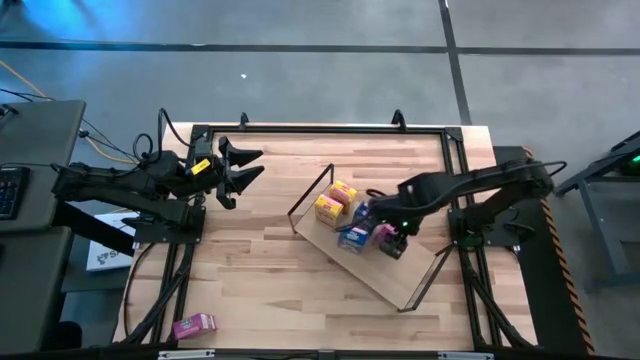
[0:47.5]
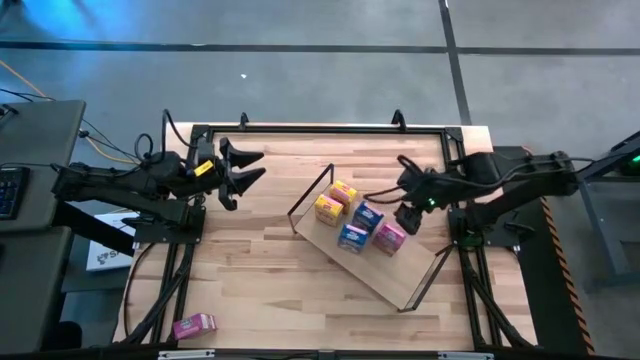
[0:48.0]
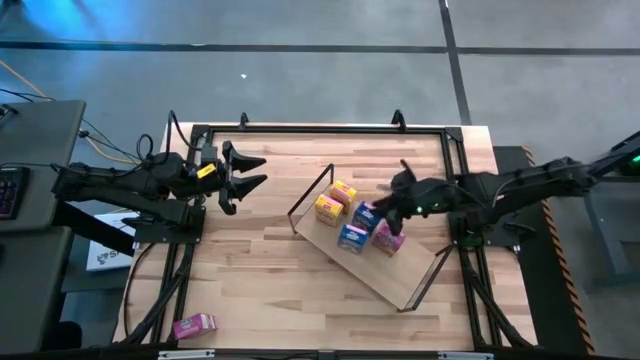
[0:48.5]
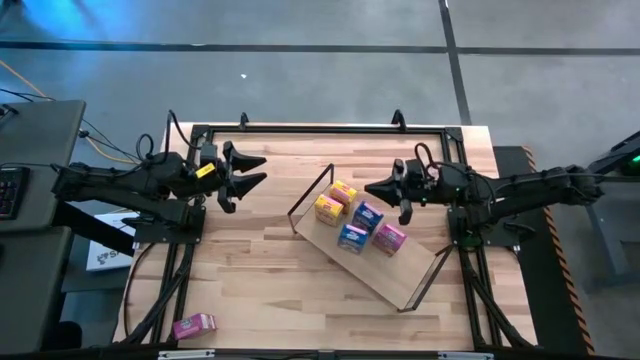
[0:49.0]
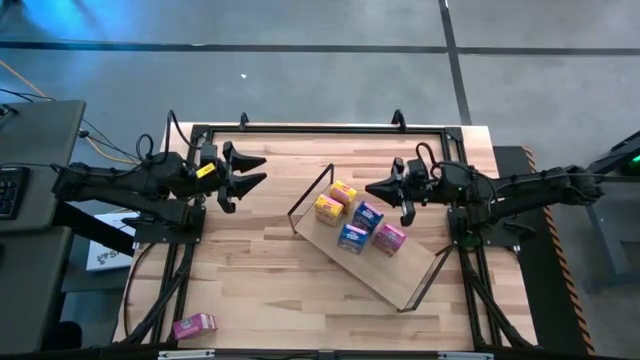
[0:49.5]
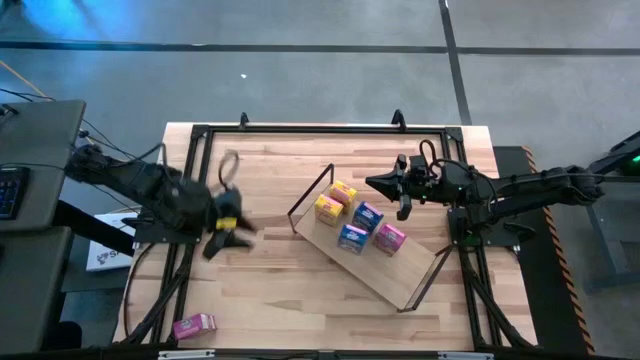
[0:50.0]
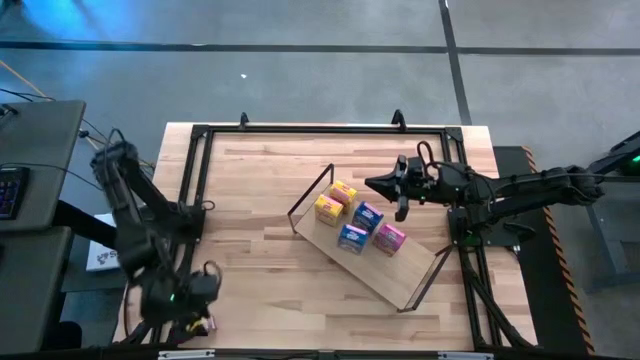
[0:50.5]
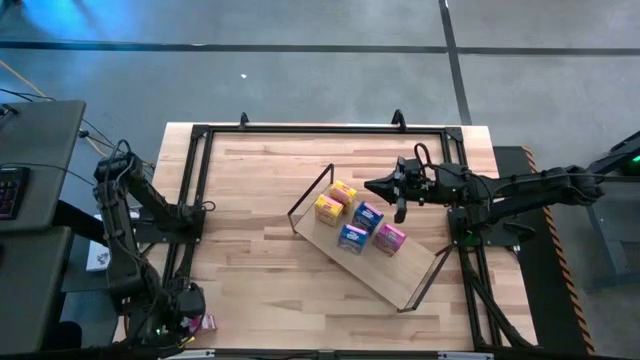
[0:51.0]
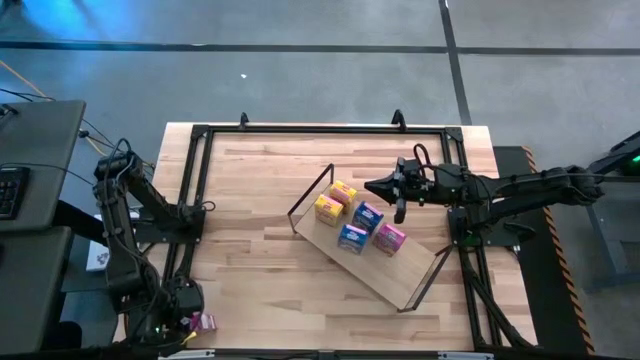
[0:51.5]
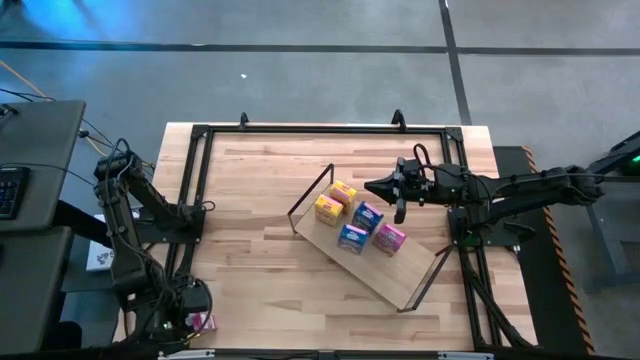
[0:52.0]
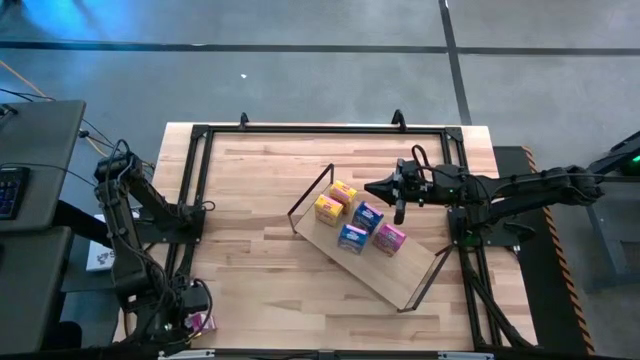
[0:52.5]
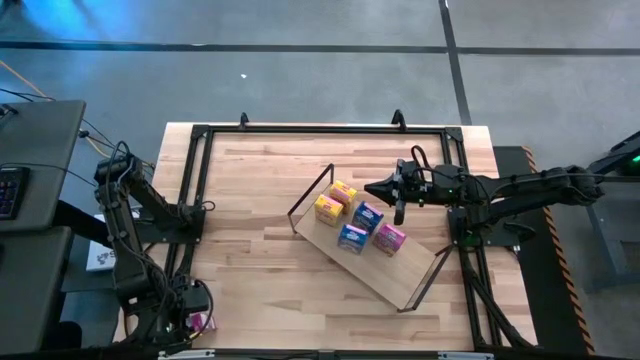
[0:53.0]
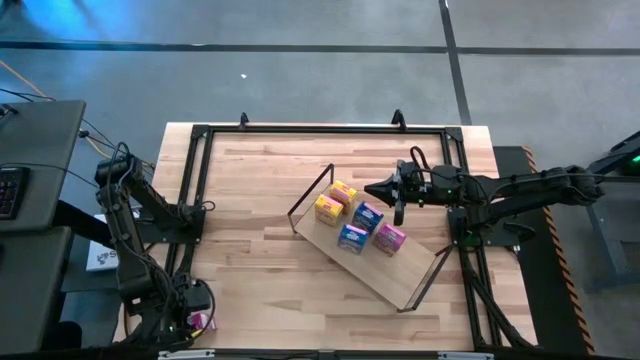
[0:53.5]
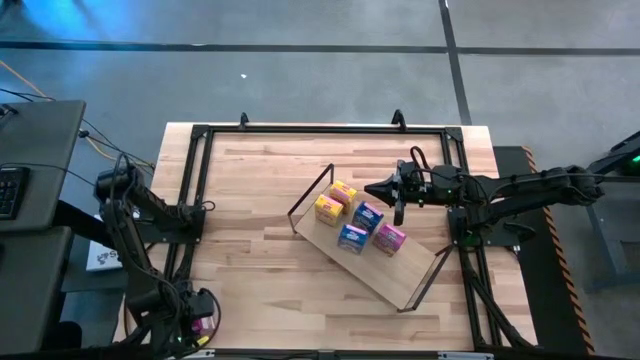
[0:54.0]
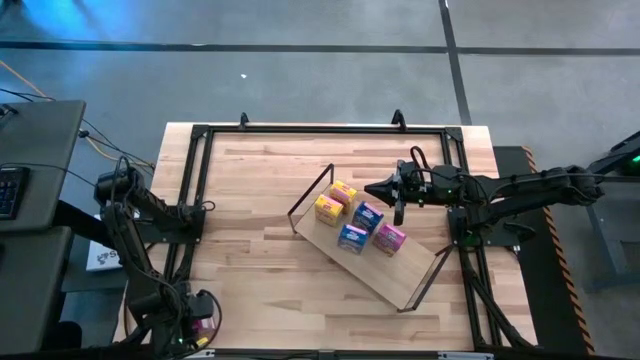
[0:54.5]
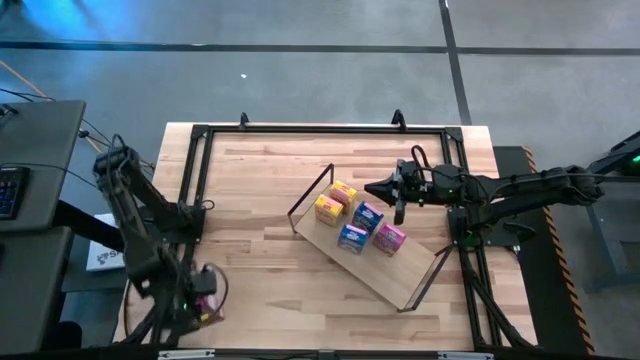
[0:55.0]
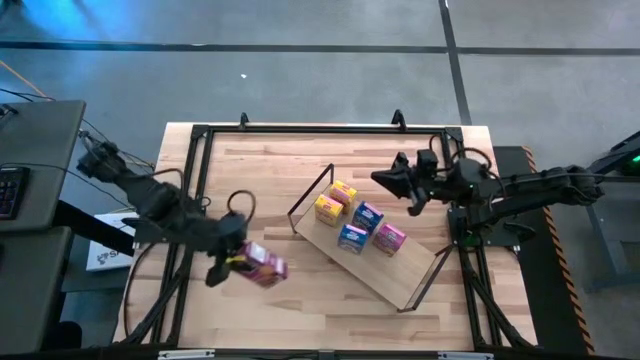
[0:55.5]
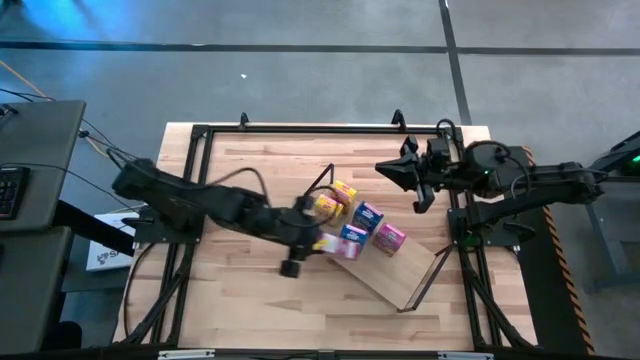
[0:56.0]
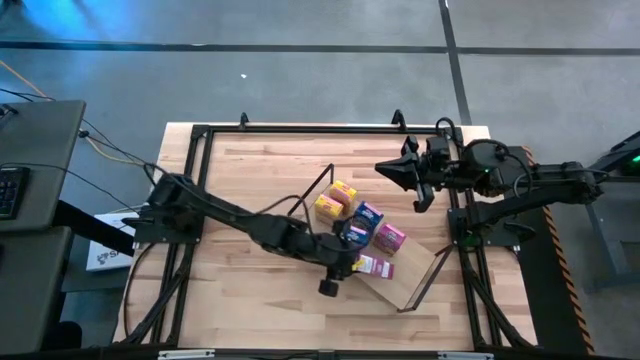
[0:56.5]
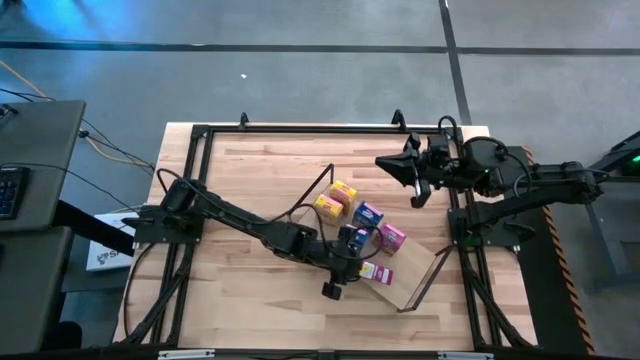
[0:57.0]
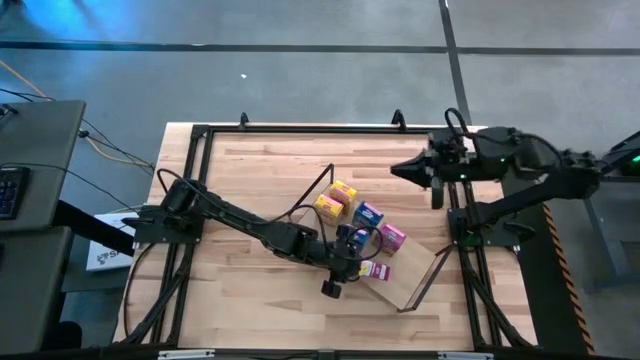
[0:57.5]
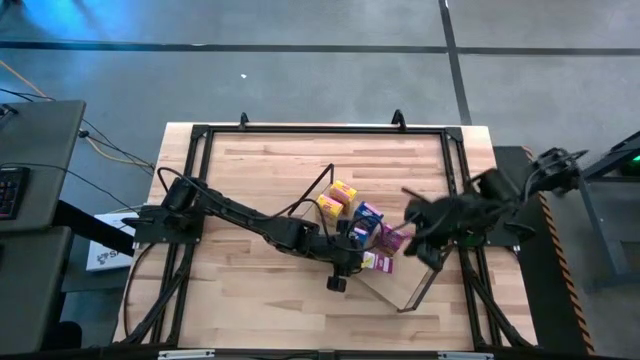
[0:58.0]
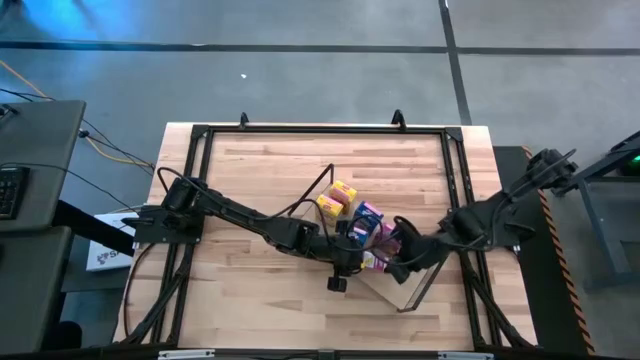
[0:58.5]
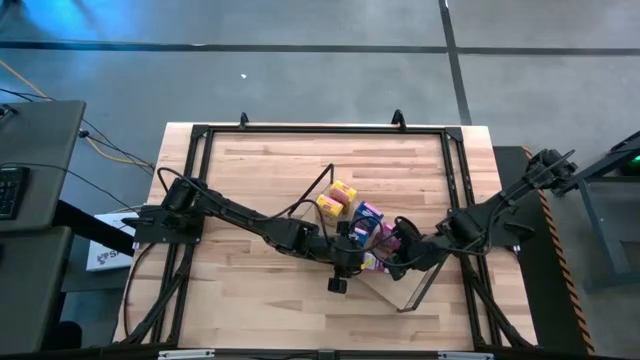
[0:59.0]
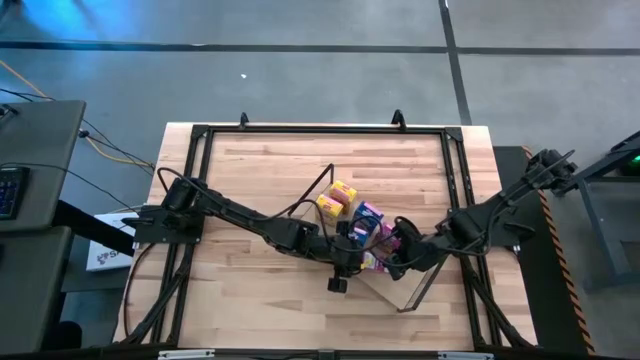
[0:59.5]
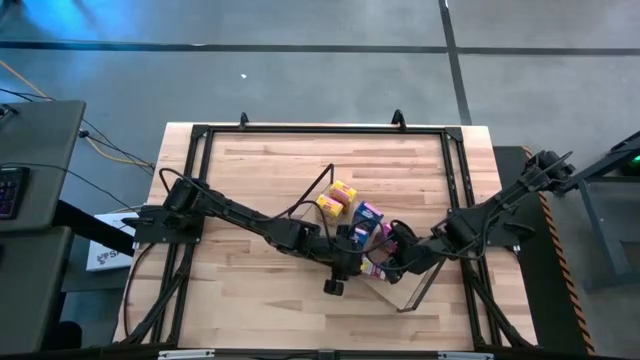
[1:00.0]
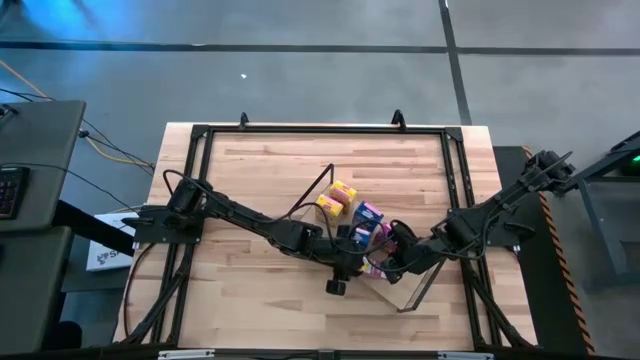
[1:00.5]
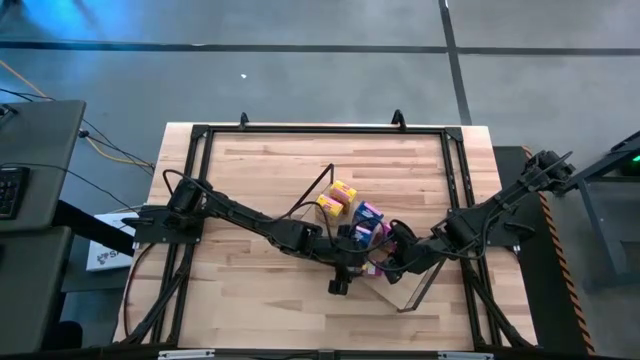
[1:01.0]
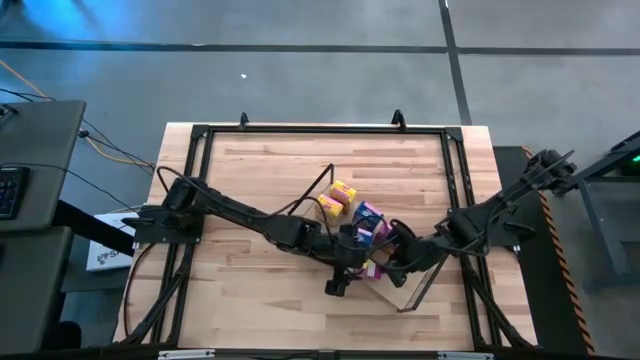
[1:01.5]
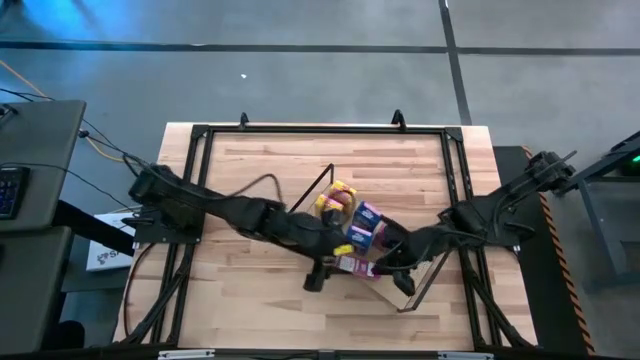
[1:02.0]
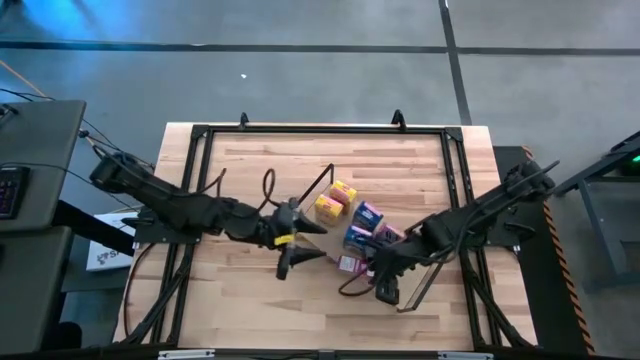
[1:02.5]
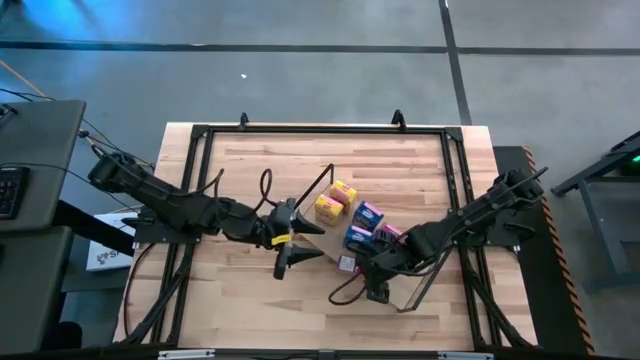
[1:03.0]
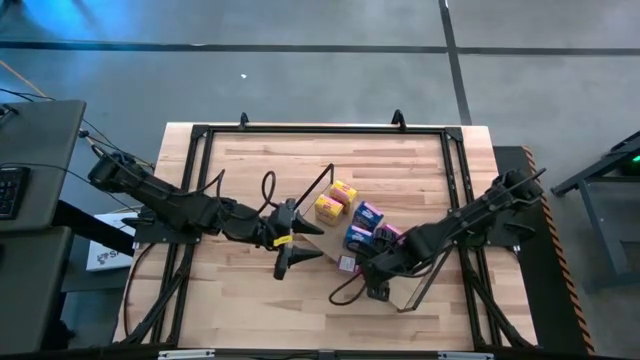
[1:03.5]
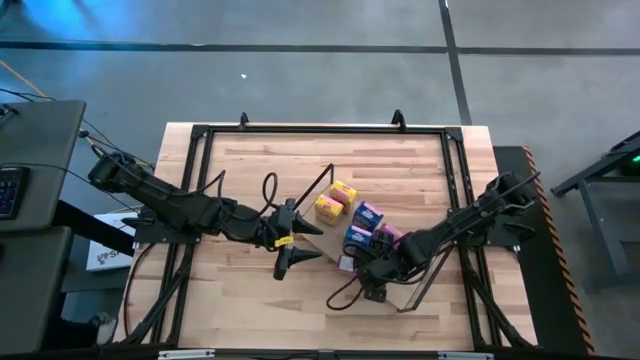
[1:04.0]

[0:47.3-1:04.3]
Task: Stack cereal on shelf
Put the bottom left purple cereal box on the shelf

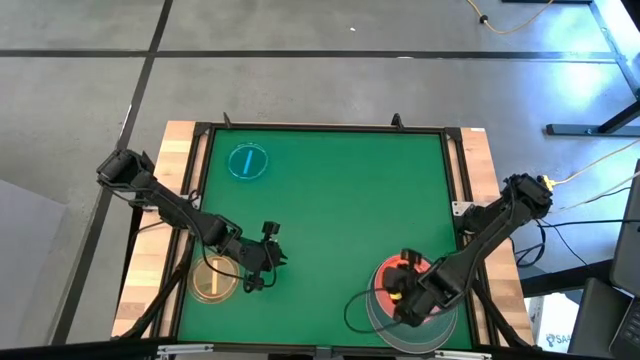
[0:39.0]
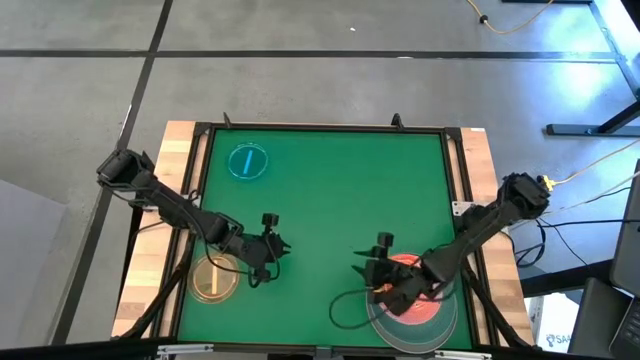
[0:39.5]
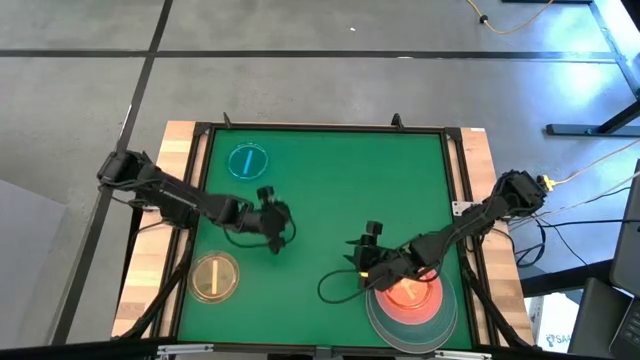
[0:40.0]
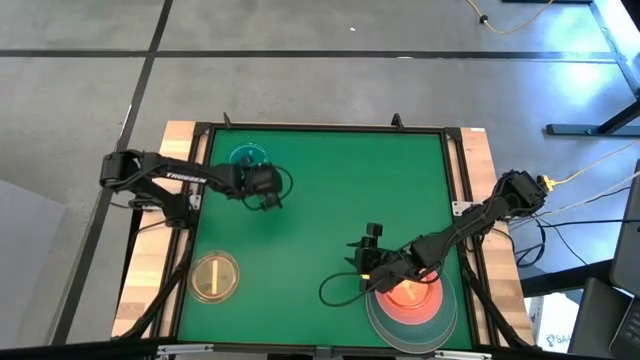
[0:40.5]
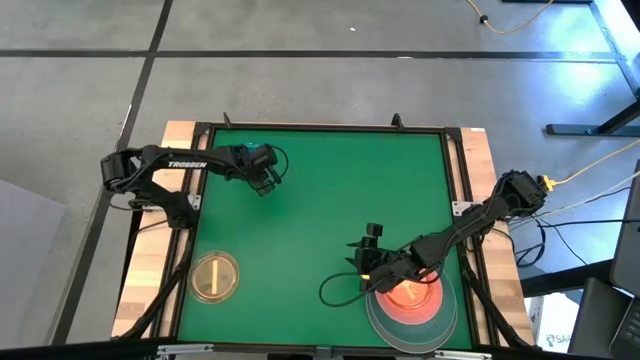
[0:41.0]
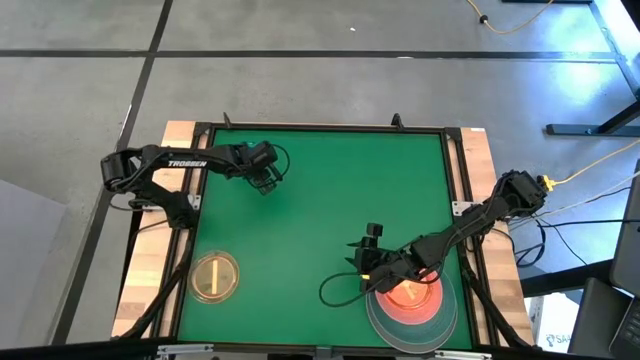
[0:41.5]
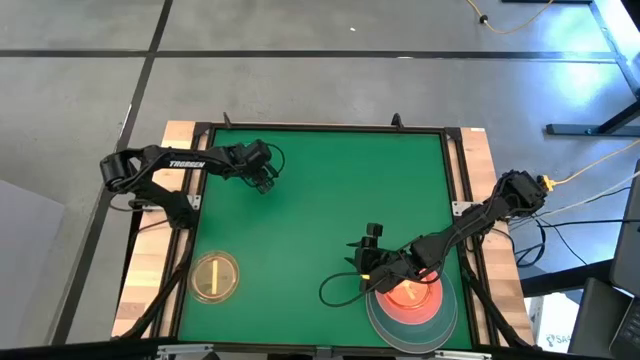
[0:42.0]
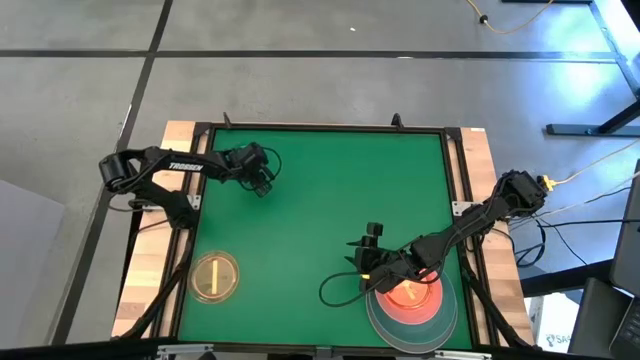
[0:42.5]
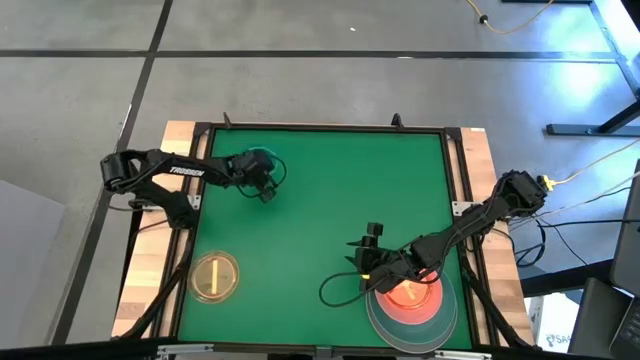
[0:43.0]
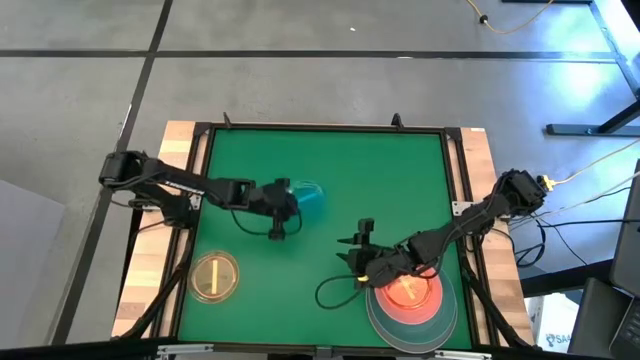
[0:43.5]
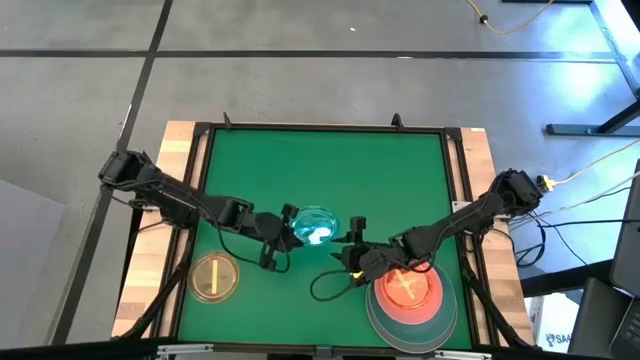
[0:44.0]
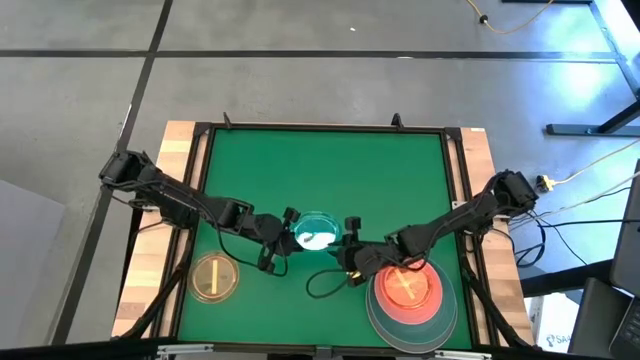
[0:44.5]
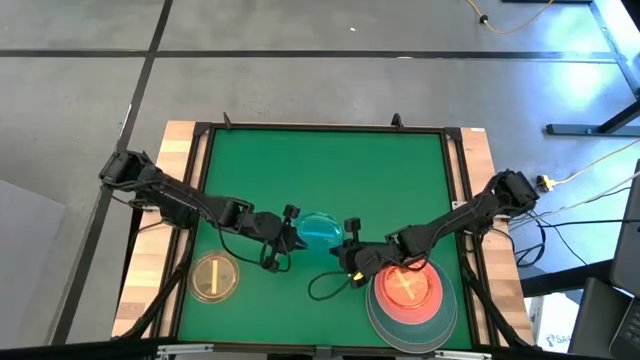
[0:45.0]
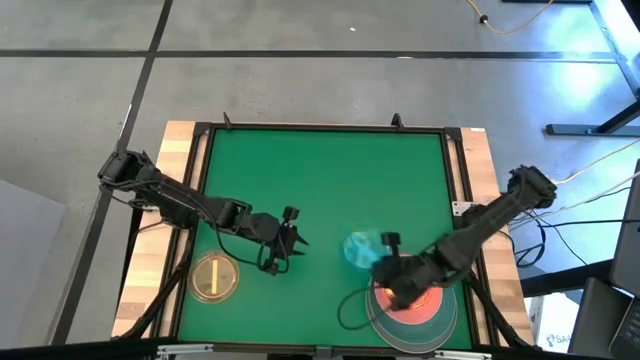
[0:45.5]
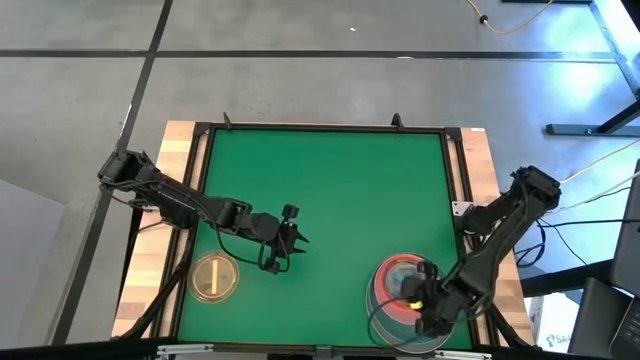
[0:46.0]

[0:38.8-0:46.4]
Task: Stack plastic plates
Stack the transparent blue plate on top of the transparent orange plate
